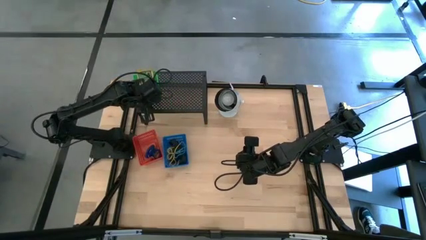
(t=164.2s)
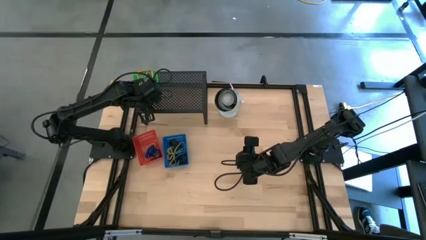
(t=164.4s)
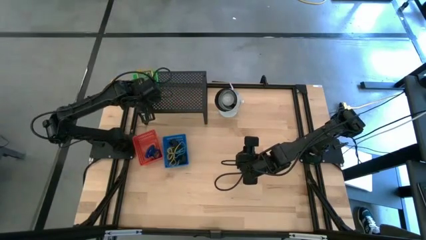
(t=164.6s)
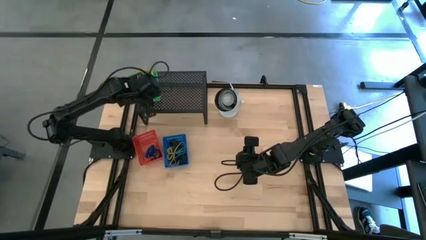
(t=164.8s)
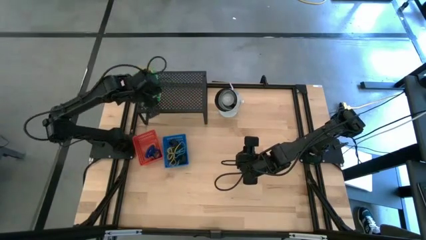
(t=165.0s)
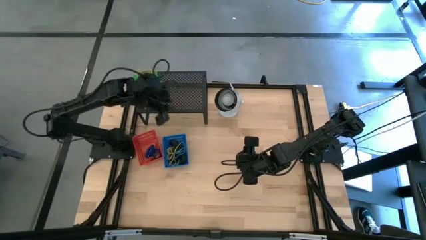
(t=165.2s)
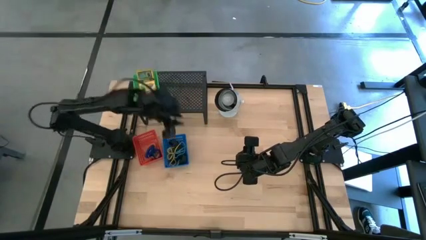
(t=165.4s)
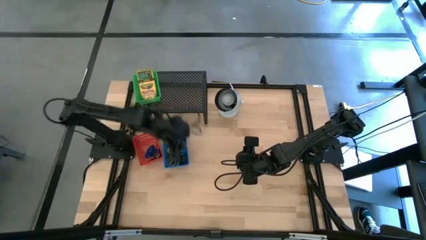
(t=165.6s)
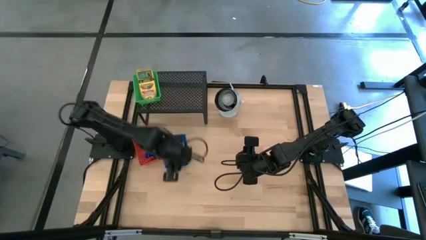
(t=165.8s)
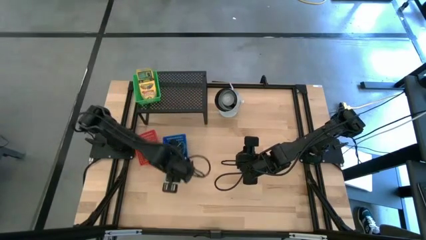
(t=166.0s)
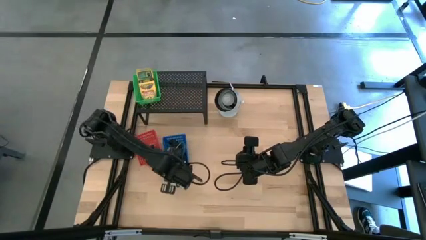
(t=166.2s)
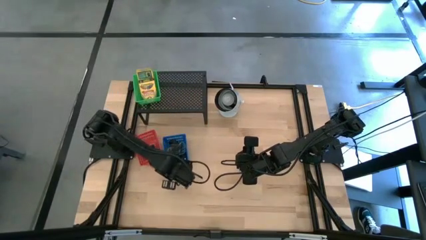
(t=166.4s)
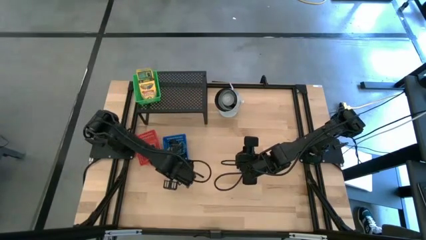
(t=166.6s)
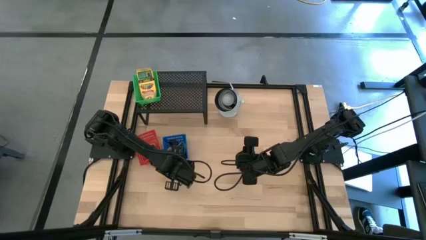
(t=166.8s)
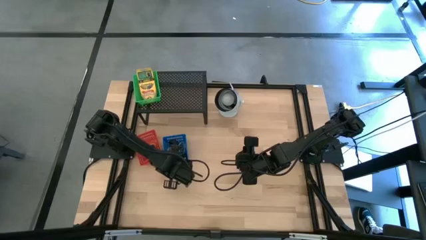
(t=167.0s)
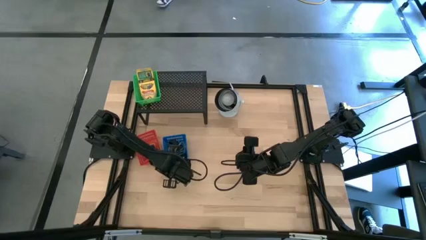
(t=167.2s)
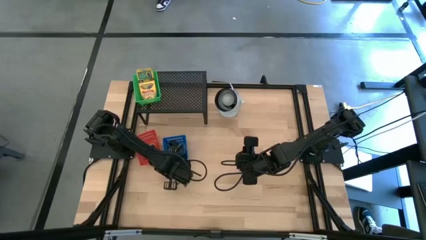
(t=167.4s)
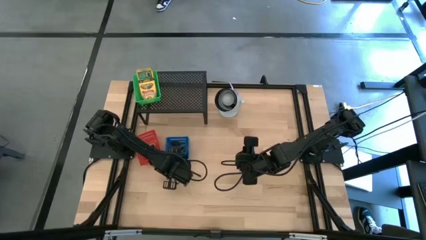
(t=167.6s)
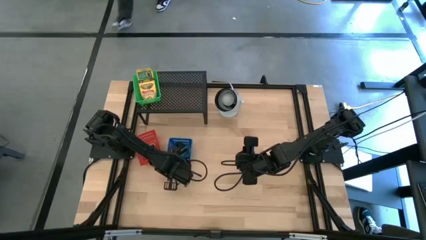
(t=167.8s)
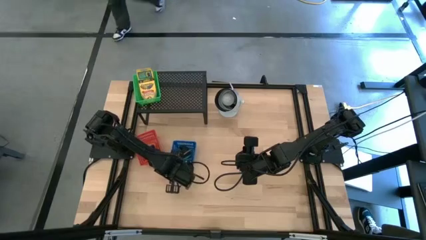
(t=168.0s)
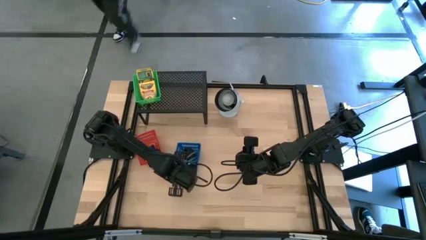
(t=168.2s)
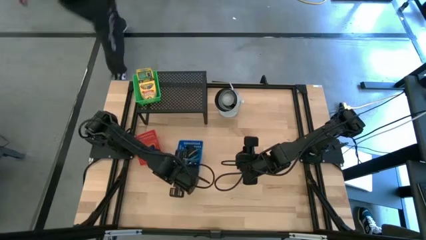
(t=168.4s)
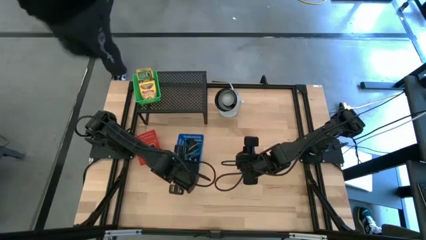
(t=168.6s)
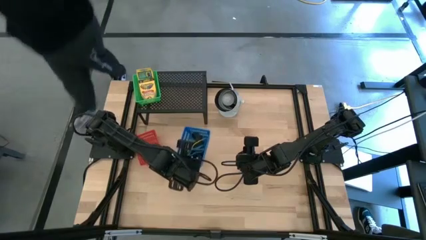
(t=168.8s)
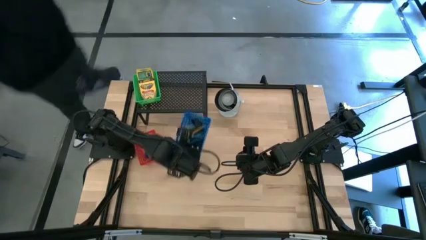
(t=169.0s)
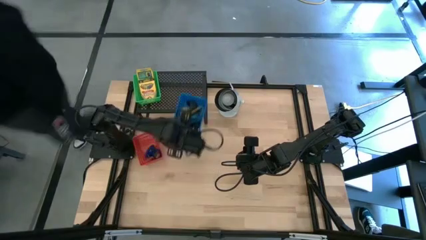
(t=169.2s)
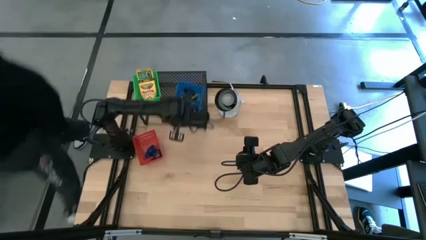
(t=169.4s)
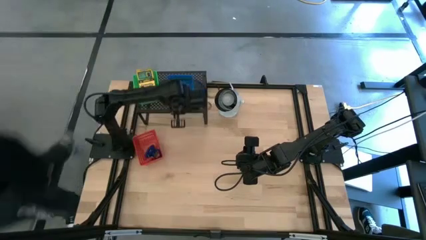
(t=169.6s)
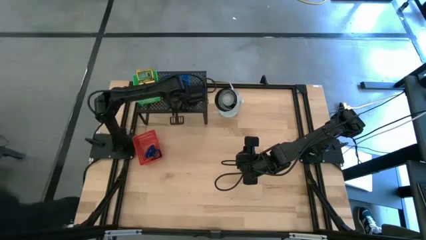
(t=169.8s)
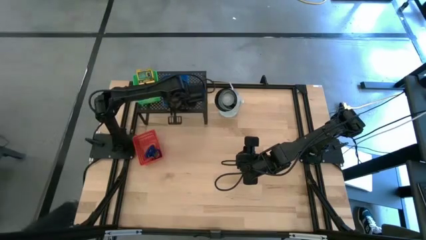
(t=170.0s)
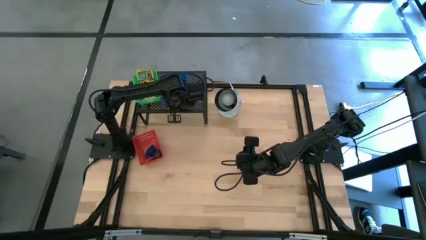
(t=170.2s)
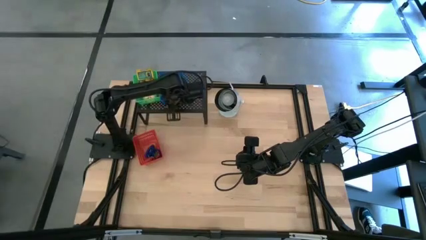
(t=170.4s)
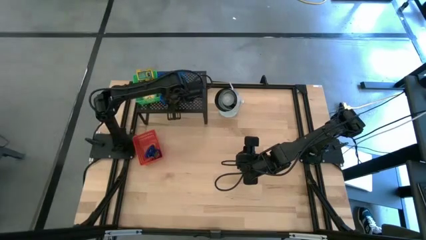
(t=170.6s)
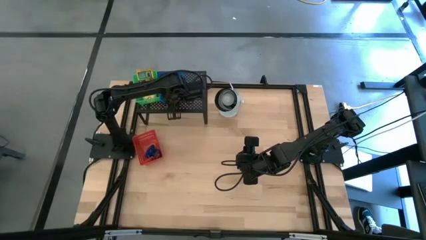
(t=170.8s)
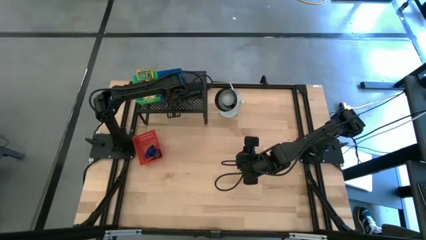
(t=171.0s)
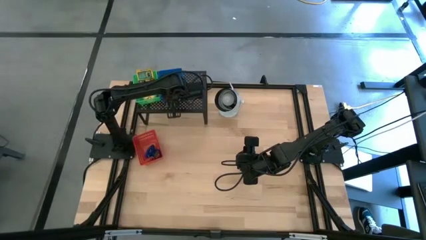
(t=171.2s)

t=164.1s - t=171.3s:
Task: Pick & Place Office Desk Supplies
Put the blue bin with rubber bands on the shelf

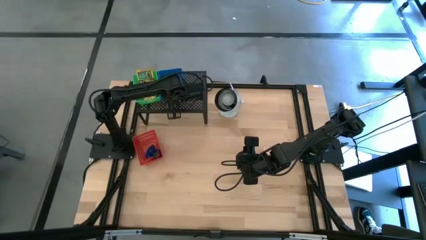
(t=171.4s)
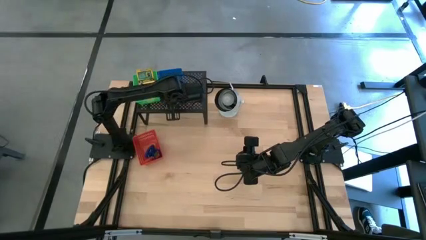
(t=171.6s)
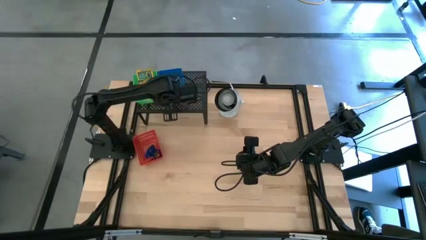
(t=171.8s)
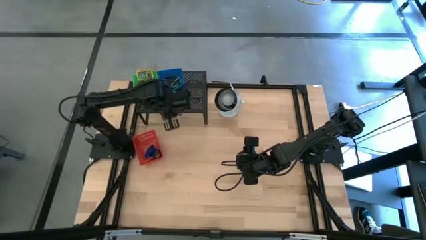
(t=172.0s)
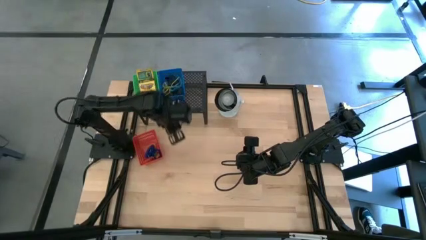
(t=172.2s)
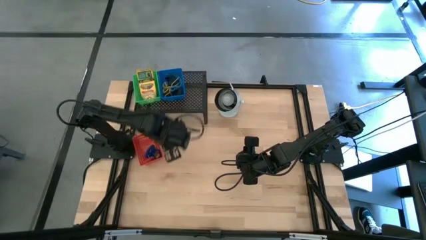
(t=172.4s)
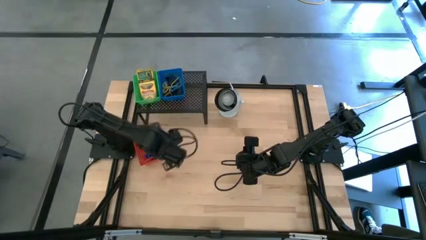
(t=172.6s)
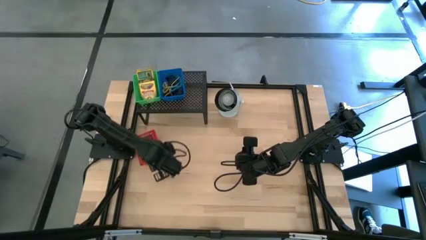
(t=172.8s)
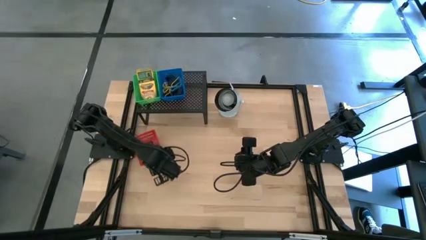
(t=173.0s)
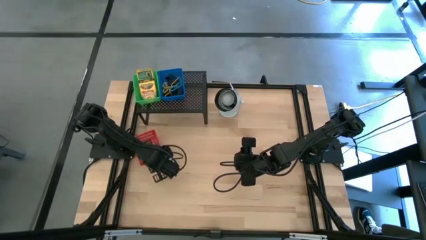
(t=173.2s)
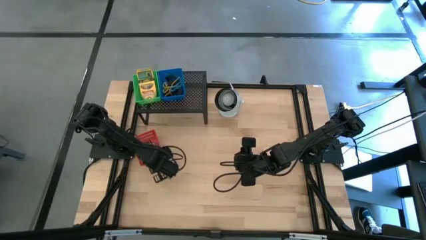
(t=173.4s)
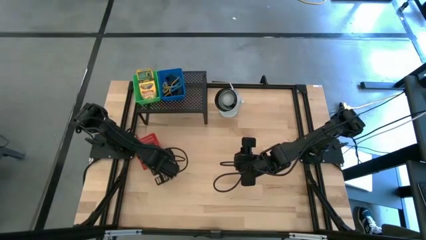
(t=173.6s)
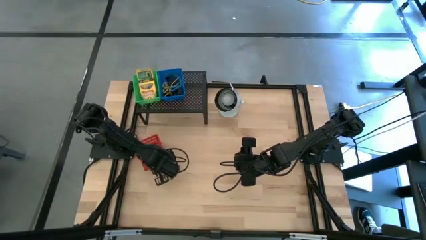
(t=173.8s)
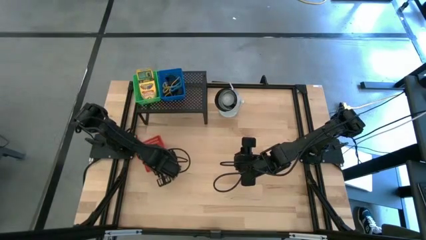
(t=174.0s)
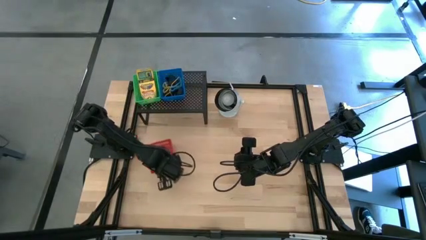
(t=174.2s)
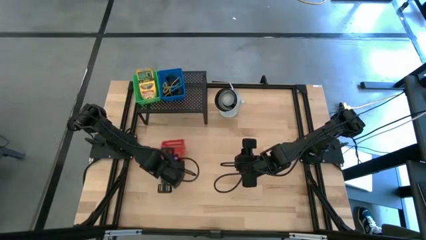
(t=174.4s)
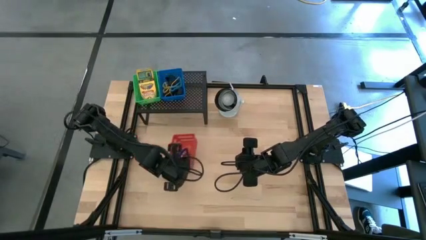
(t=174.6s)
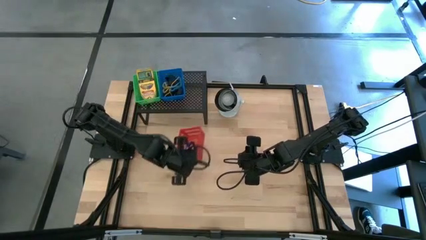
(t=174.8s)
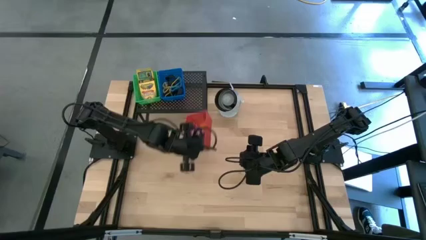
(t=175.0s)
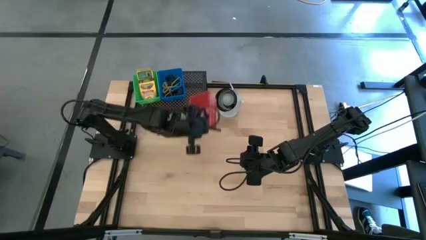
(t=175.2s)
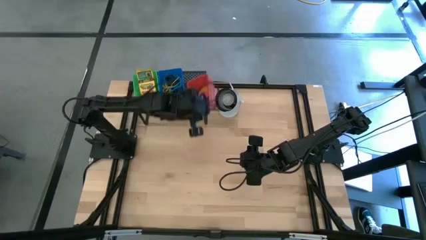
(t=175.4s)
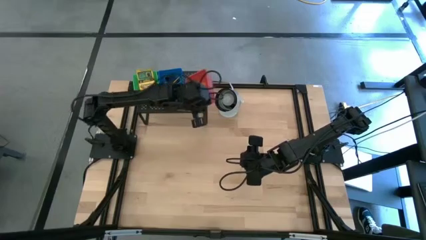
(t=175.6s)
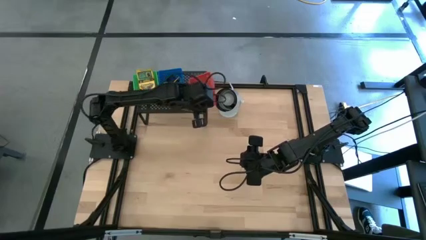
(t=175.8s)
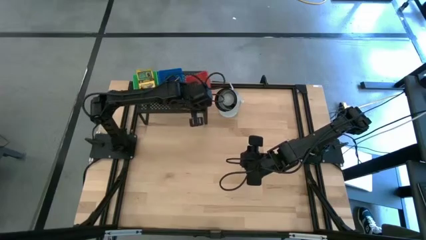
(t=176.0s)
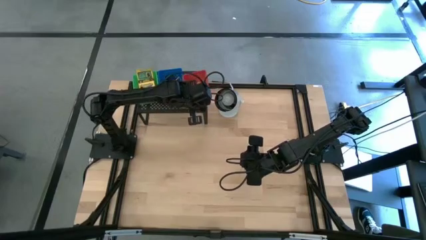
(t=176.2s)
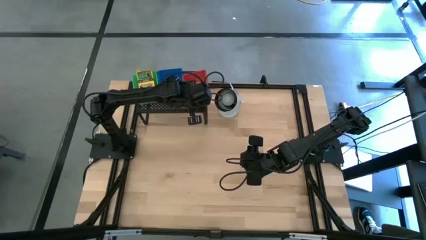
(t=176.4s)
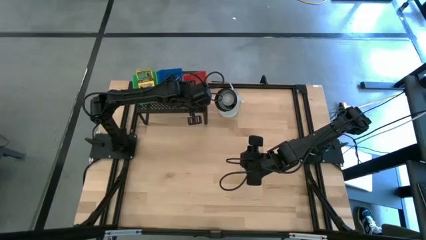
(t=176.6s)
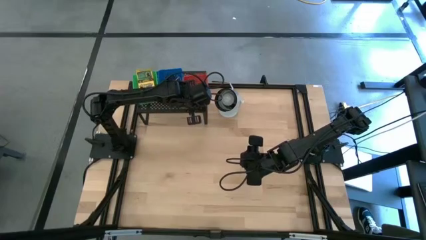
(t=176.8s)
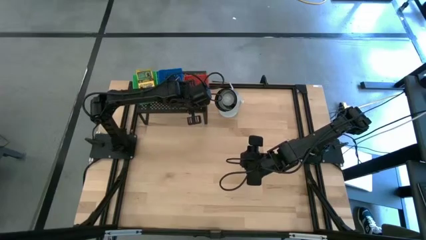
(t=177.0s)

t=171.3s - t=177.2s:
Put the red bin with spring keychains on the shelf

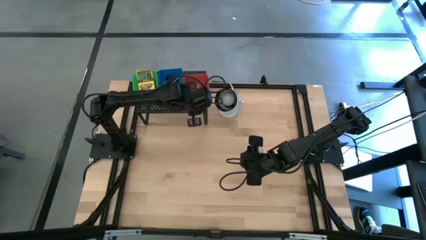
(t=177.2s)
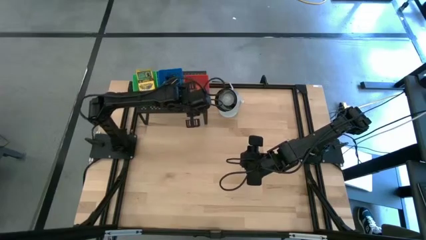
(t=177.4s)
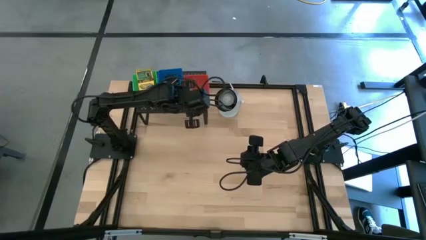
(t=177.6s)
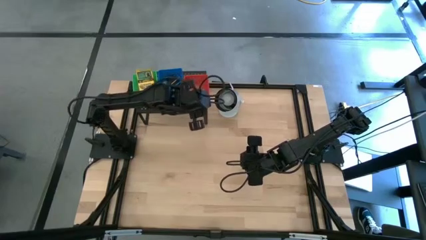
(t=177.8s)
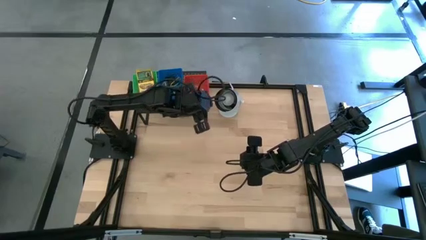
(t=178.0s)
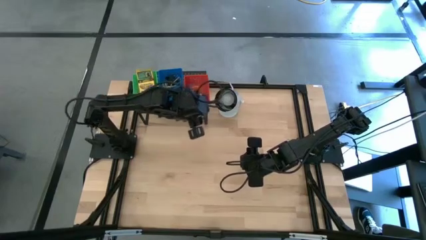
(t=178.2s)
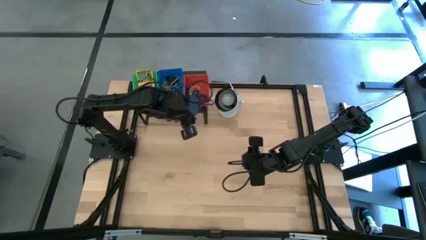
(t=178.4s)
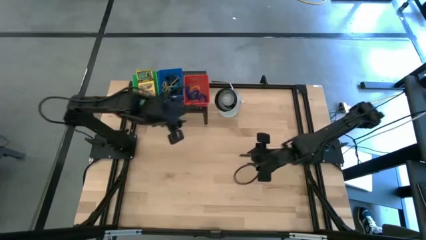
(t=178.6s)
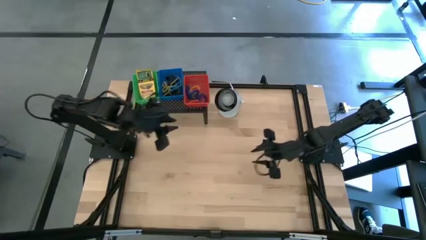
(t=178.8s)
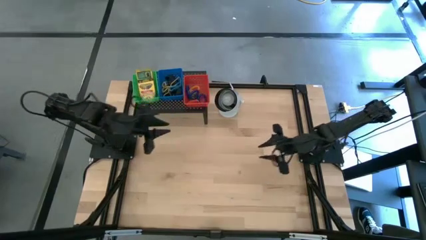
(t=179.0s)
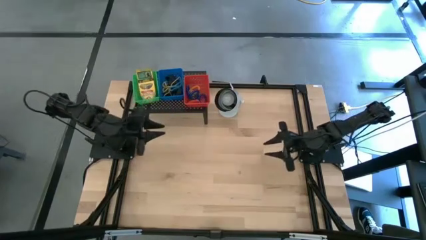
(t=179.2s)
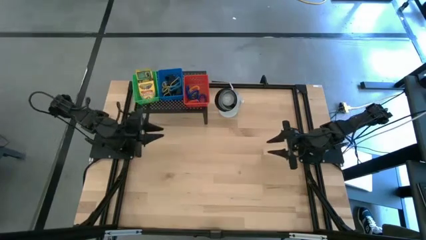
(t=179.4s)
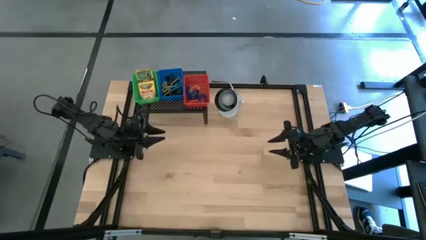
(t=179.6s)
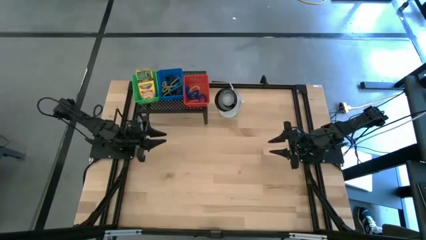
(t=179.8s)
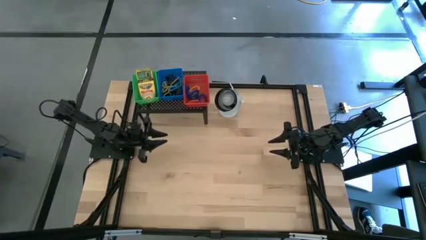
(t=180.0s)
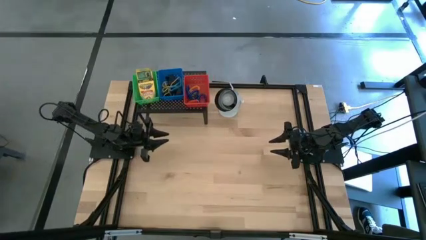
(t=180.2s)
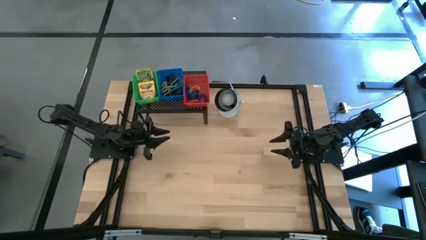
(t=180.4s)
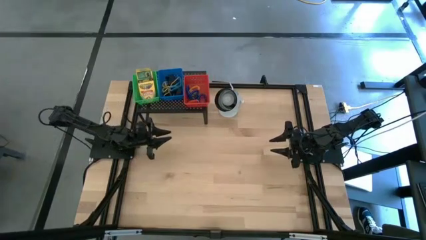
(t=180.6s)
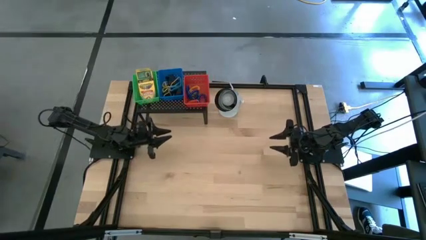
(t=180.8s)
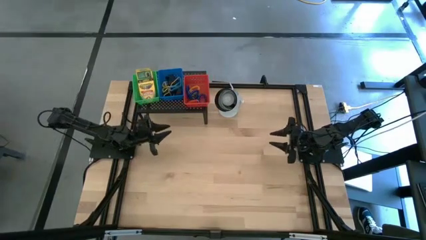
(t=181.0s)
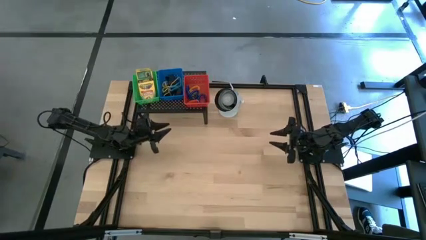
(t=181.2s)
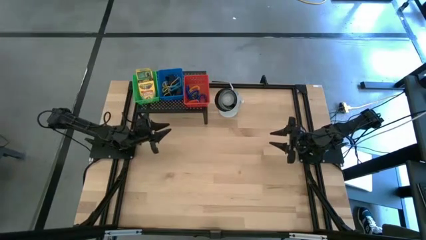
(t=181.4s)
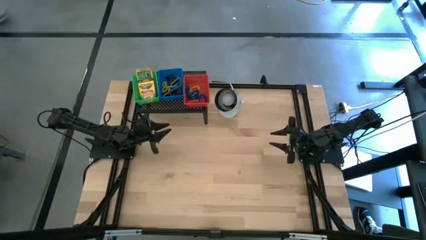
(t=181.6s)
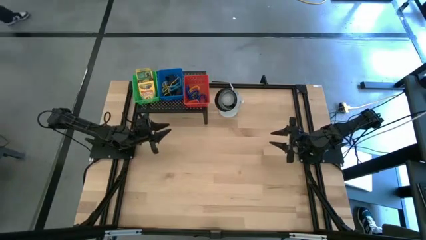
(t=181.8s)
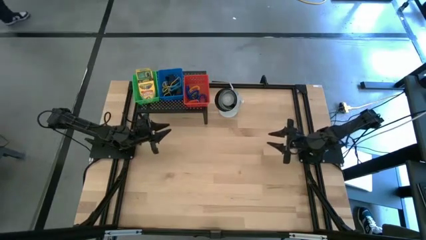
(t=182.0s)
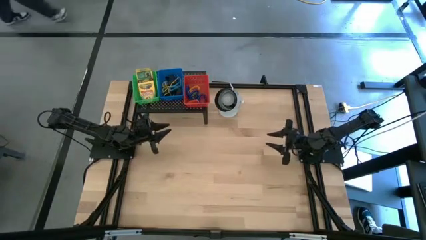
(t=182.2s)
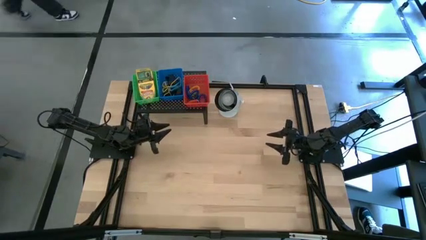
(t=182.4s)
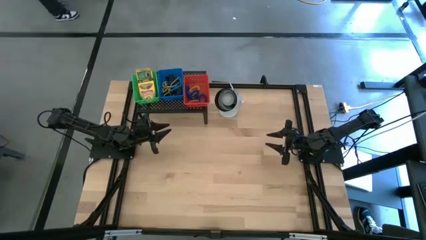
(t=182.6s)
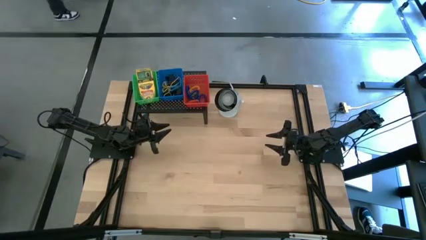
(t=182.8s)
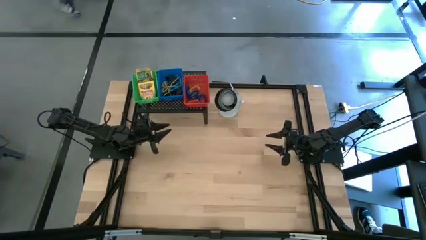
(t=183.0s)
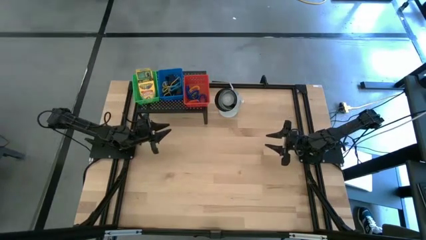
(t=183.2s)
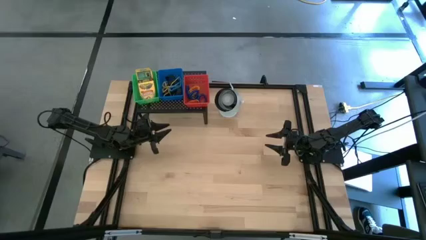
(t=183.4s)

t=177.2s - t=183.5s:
Return to Home Position
